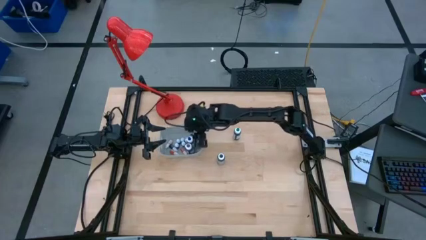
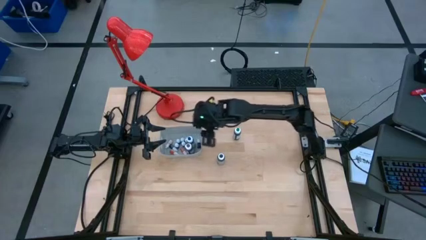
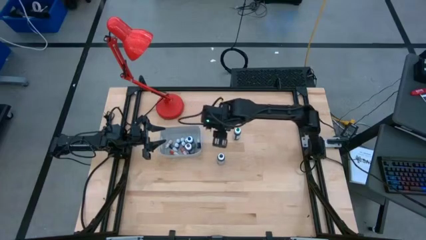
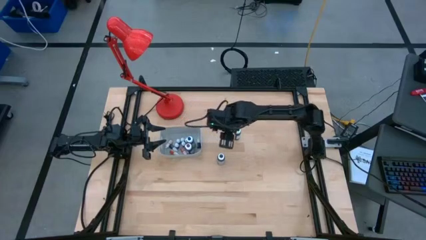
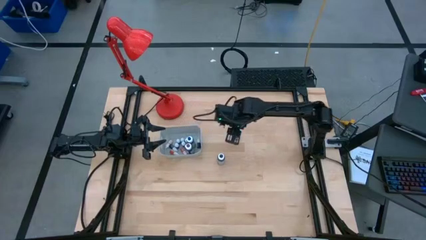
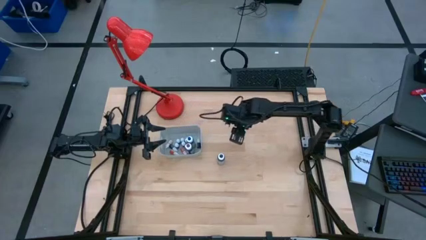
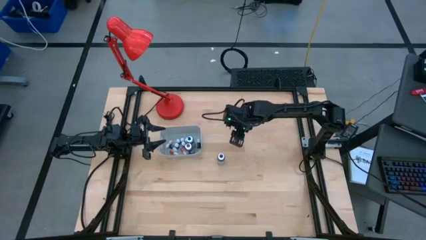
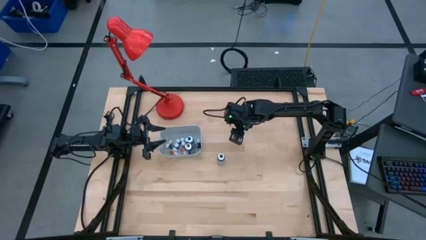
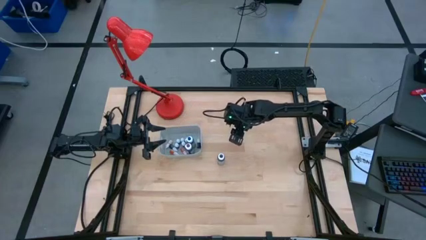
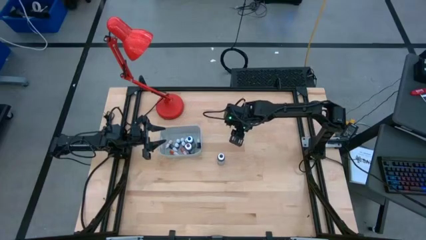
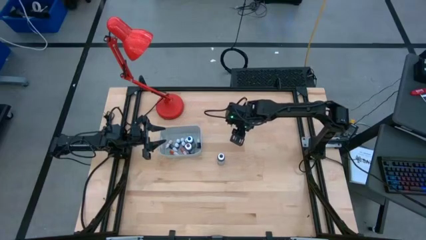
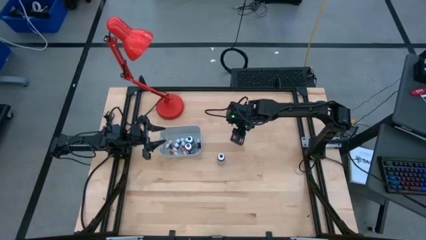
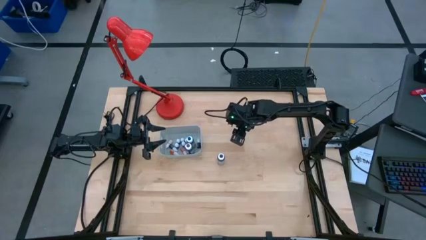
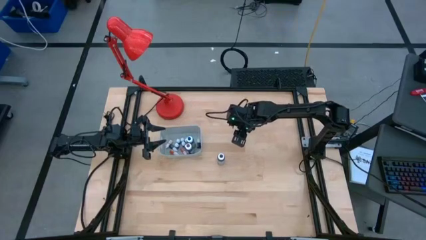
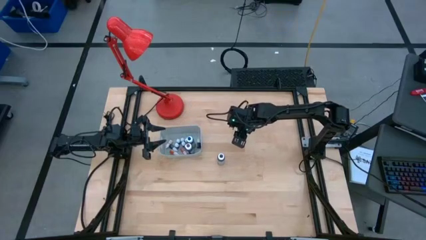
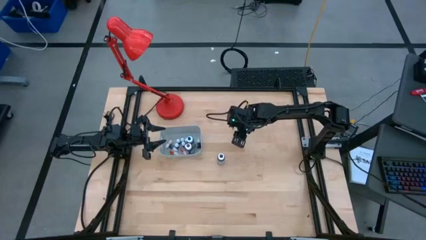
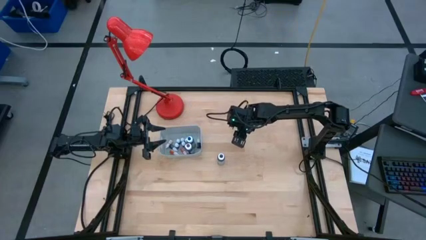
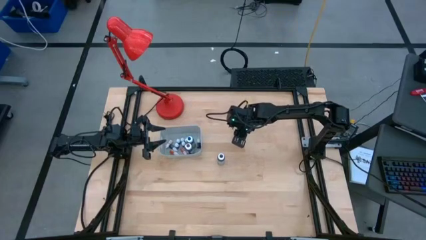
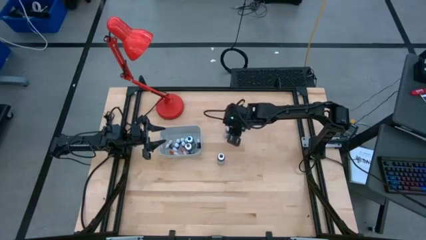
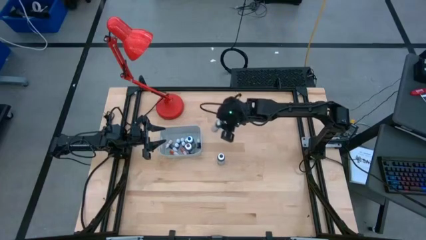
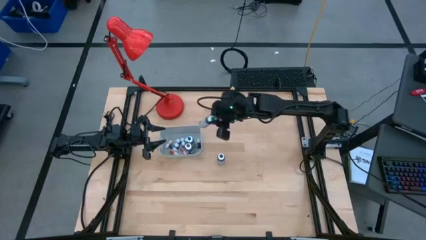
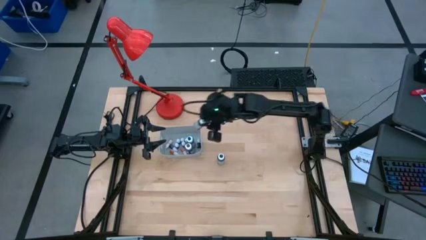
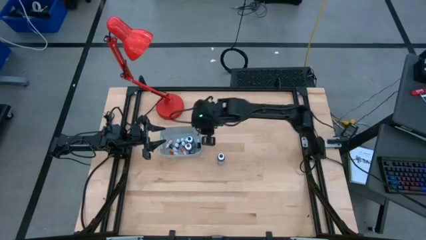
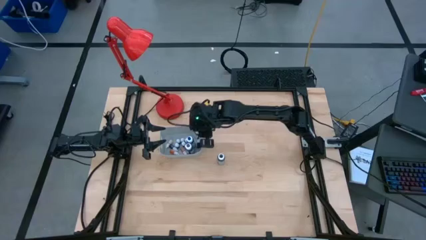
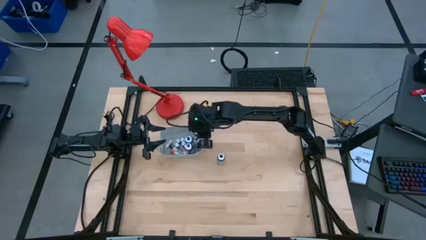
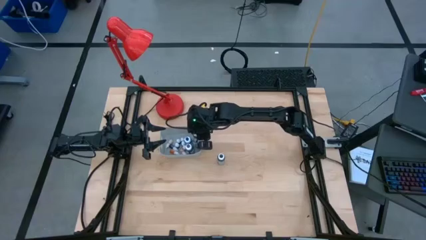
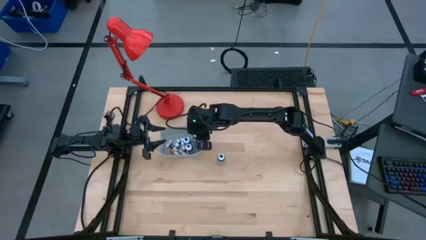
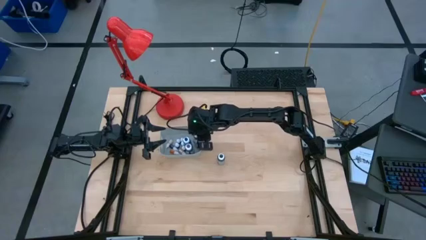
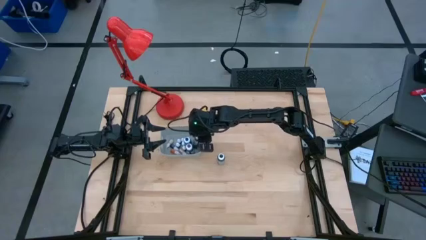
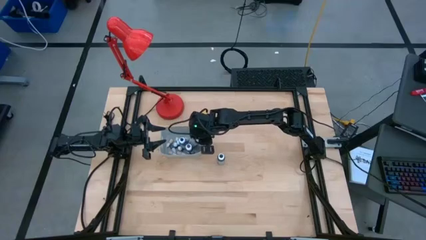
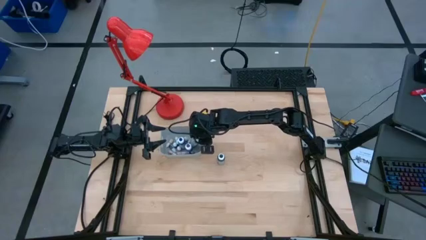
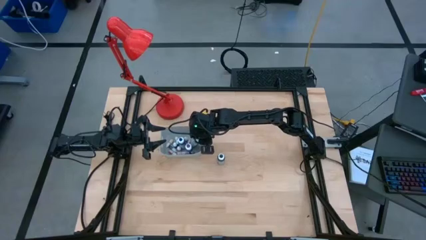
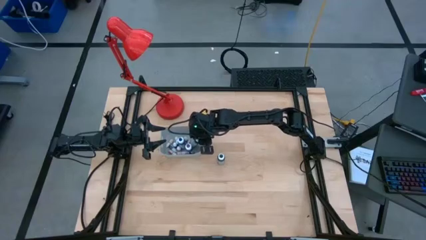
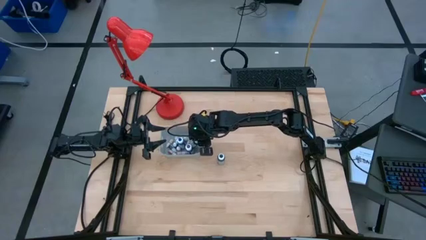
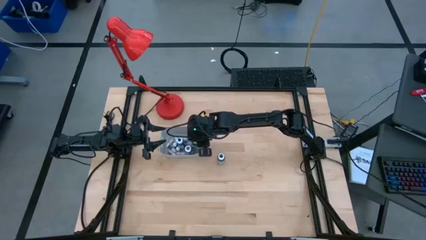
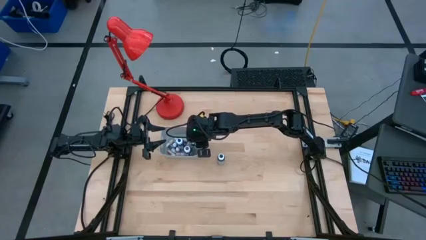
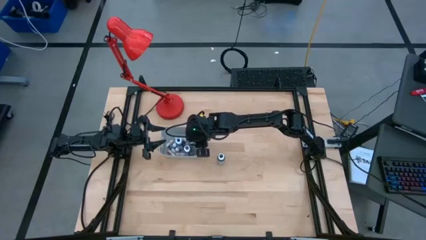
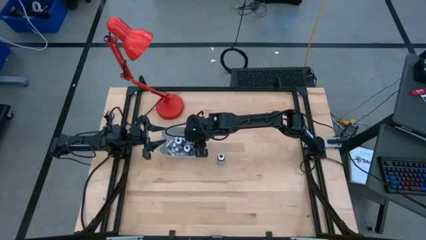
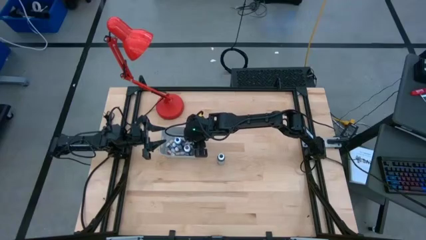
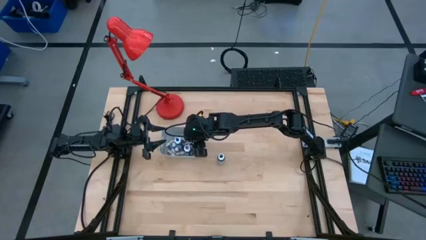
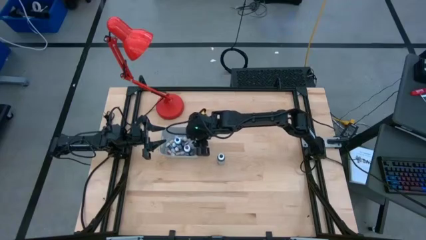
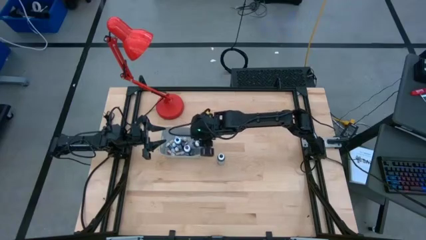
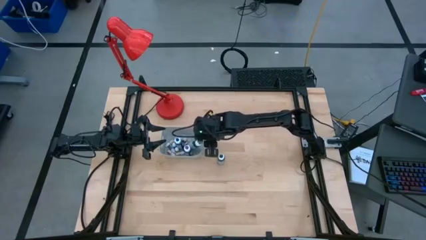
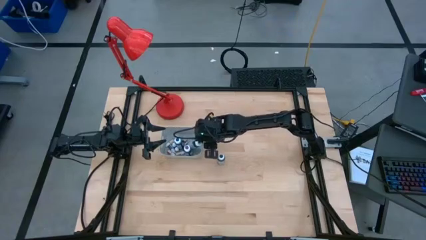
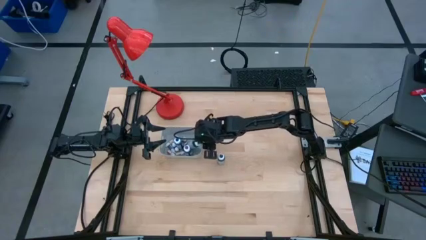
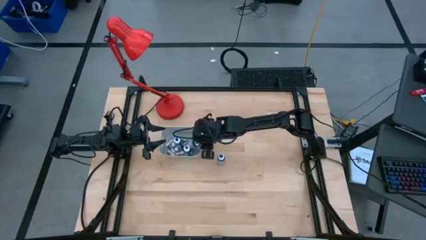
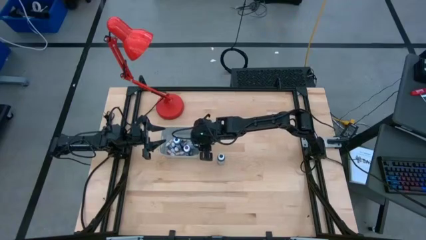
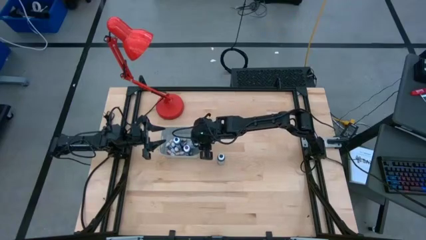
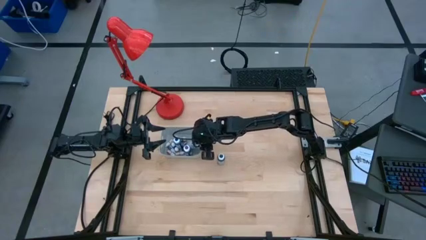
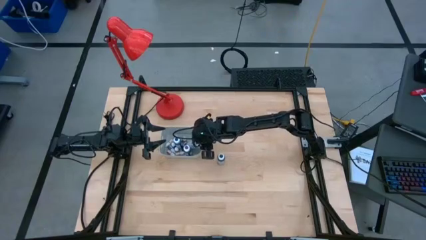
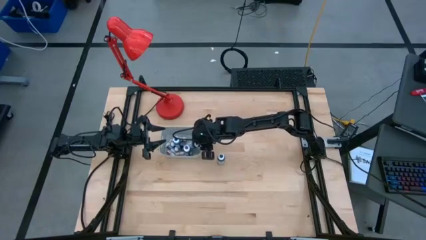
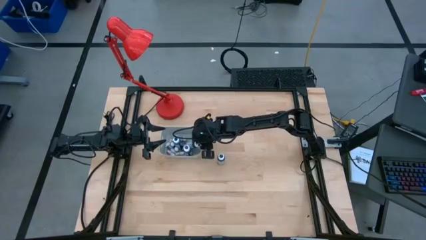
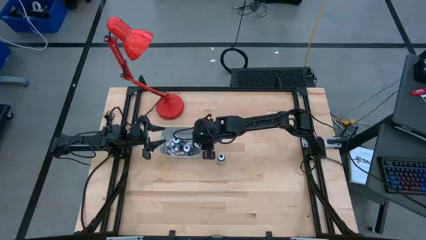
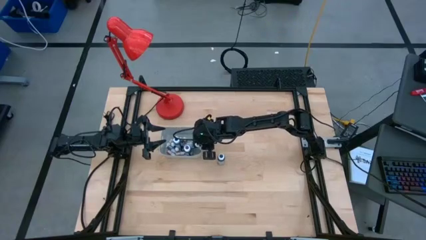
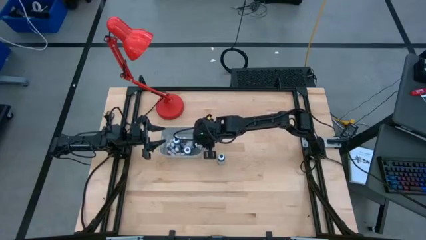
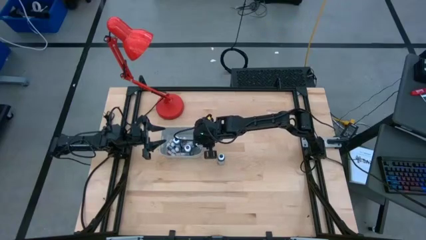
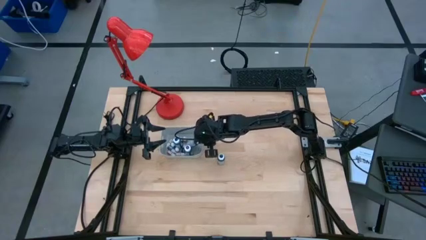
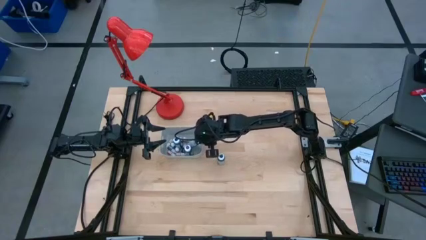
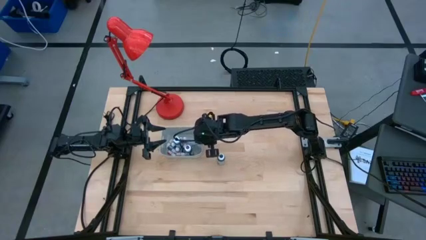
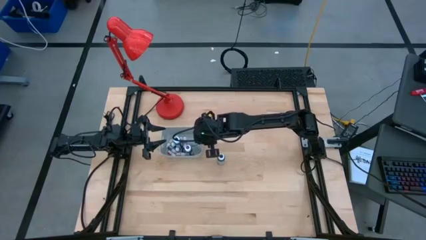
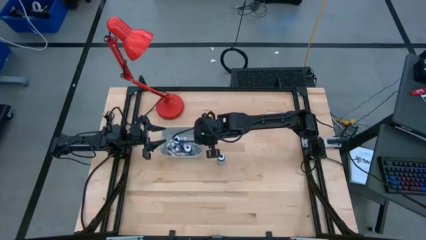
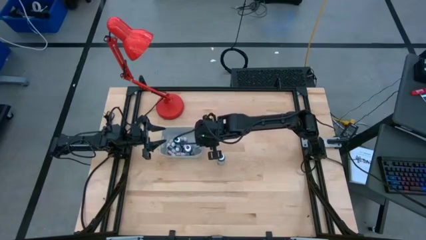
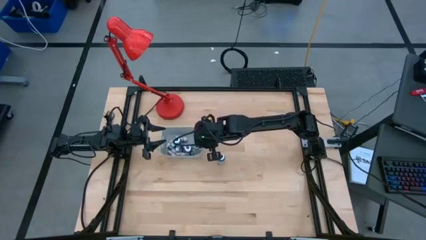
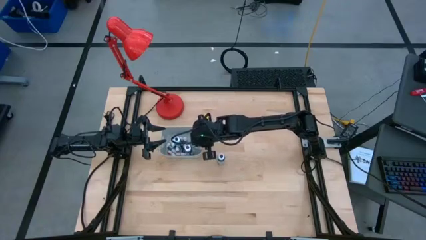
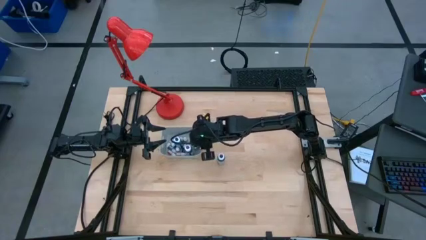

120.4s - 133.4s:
Task: Pick & Place food coloring
Put the big green coloring bottle into the gray container

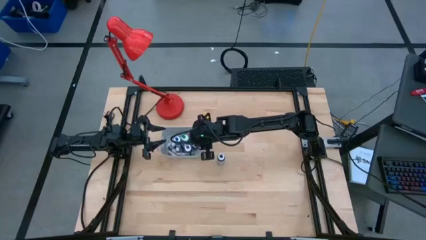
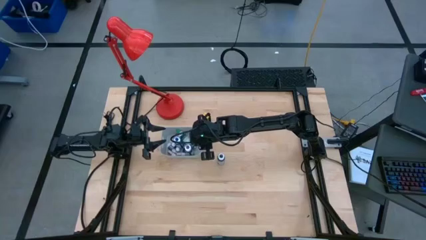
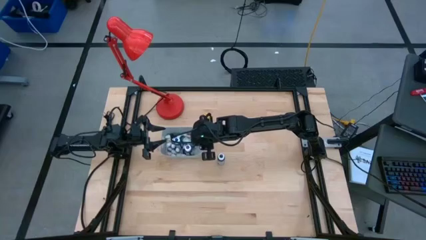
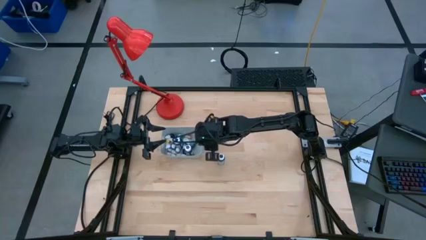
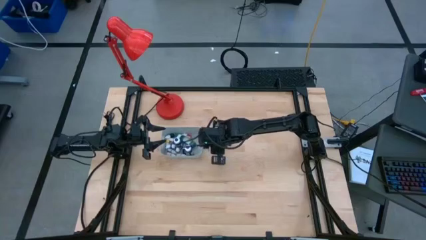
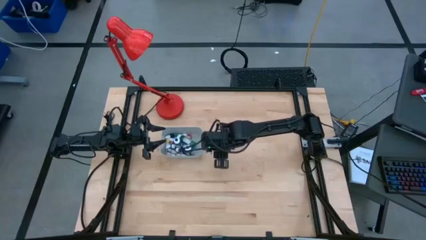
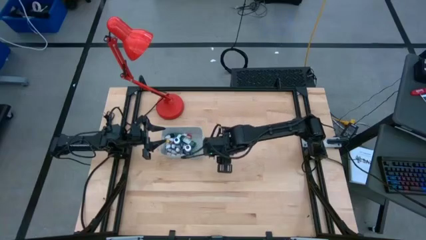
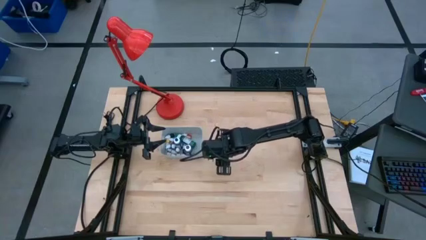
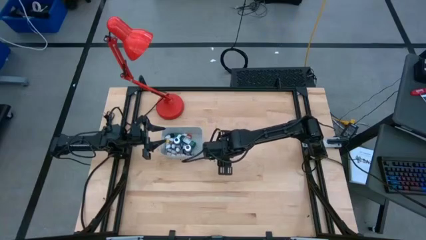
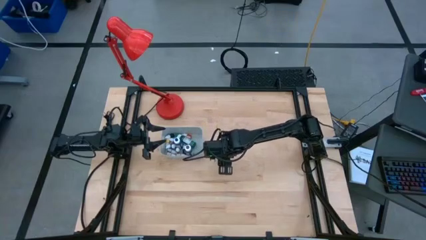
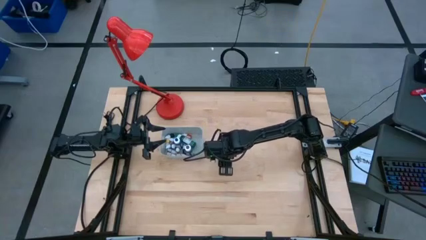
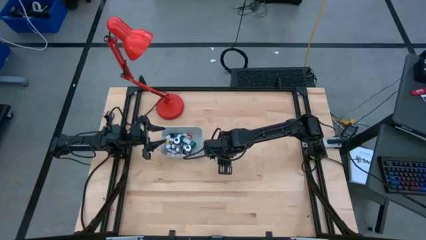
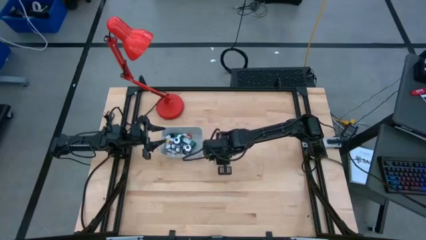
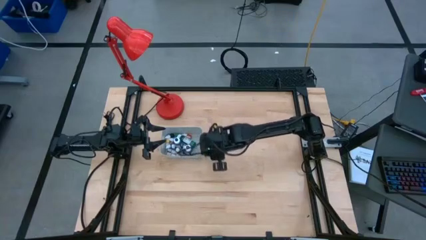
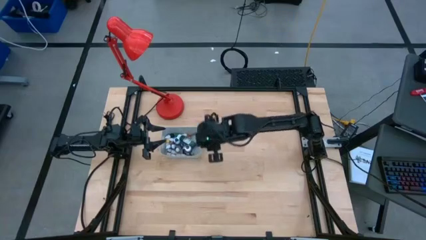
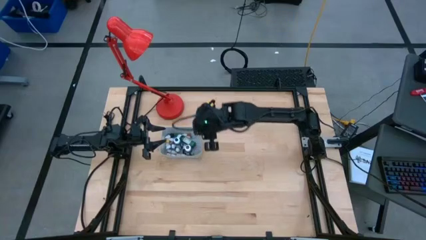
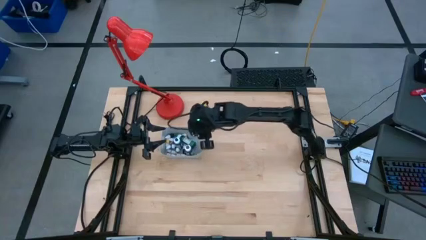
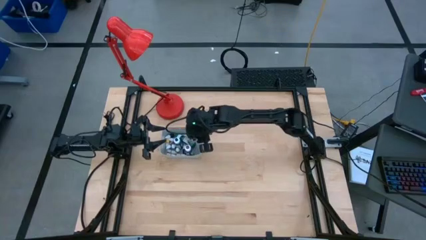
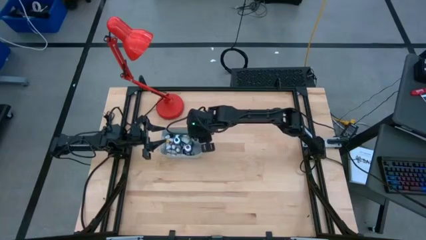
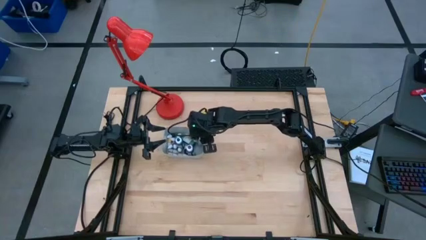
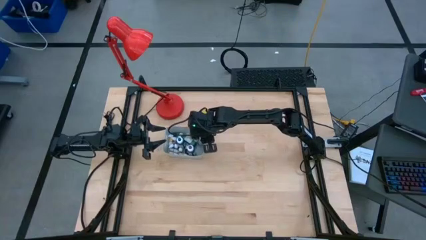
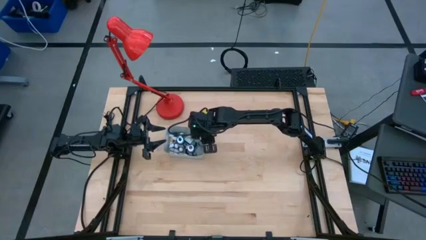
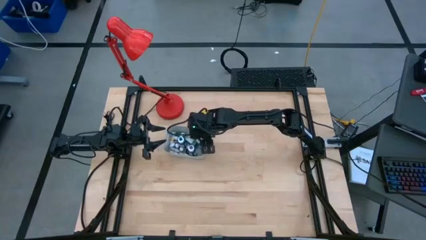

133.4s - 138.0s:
Put the big black coloring bottle into the gray container
